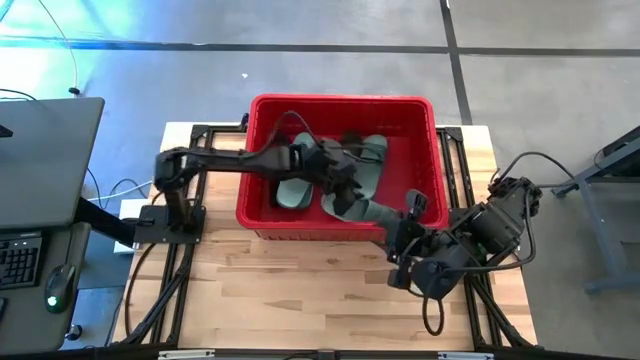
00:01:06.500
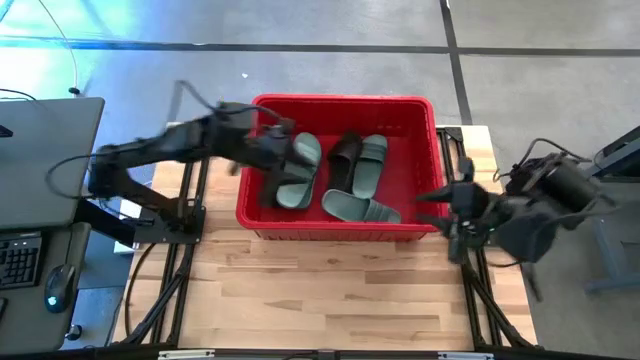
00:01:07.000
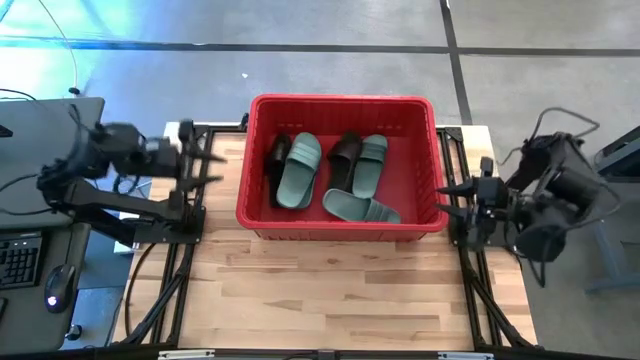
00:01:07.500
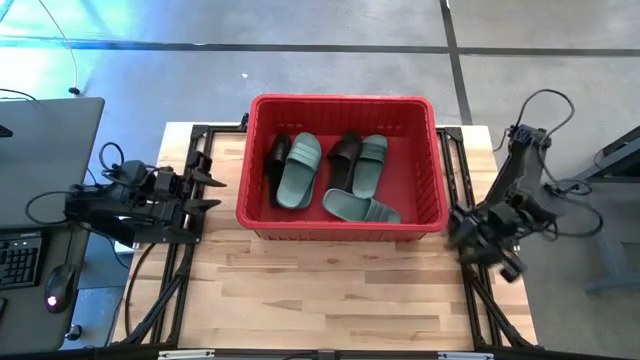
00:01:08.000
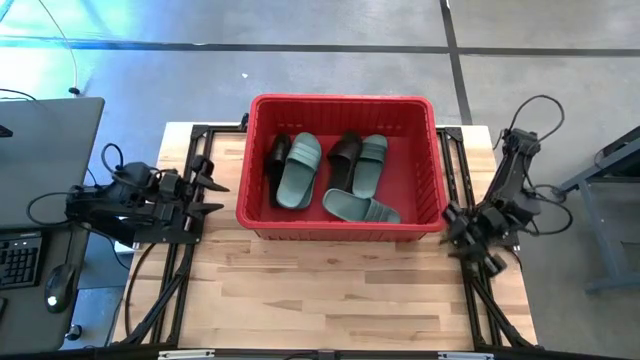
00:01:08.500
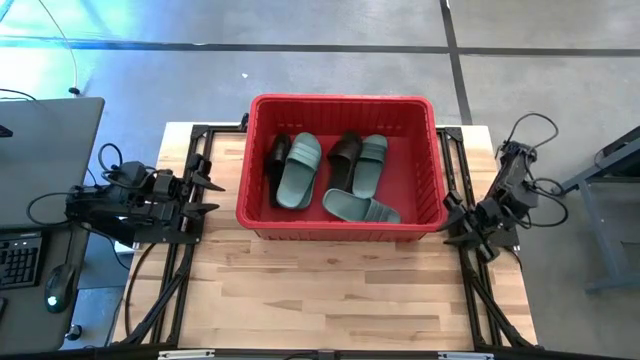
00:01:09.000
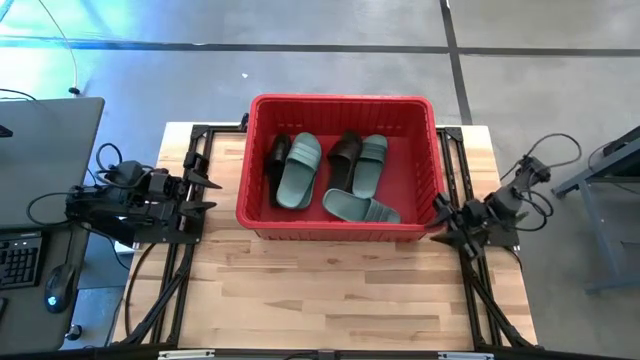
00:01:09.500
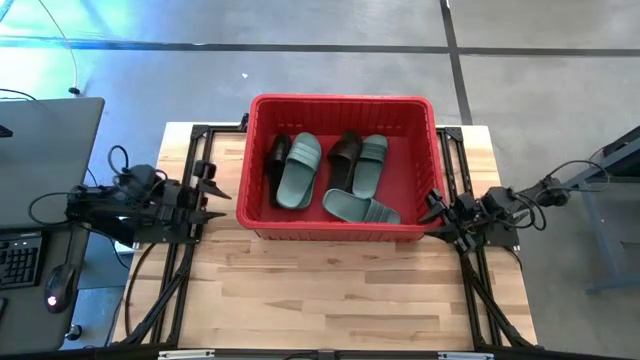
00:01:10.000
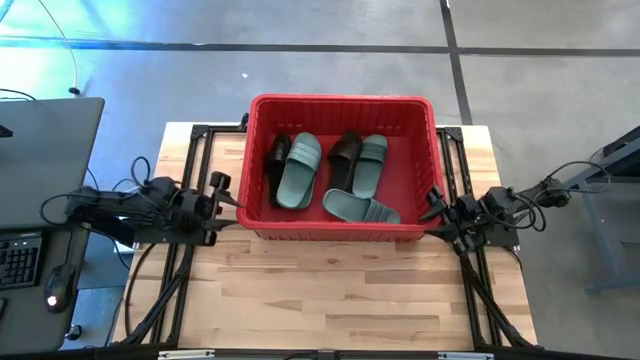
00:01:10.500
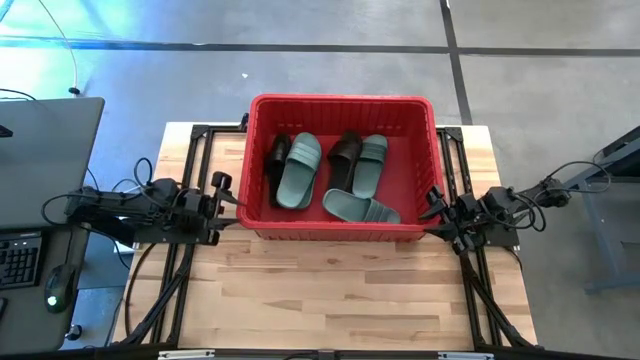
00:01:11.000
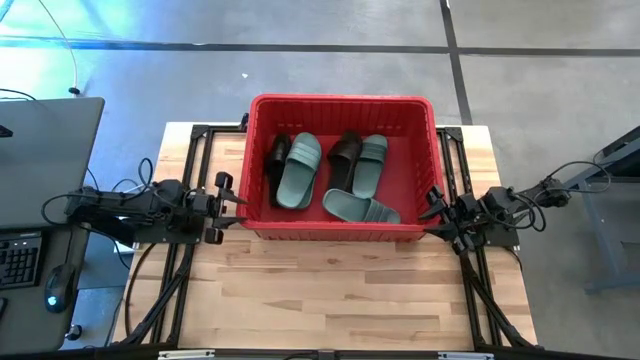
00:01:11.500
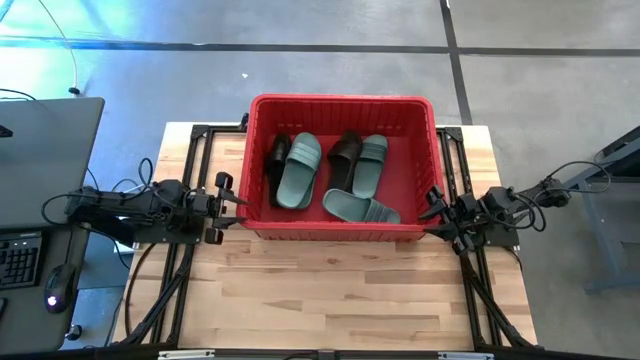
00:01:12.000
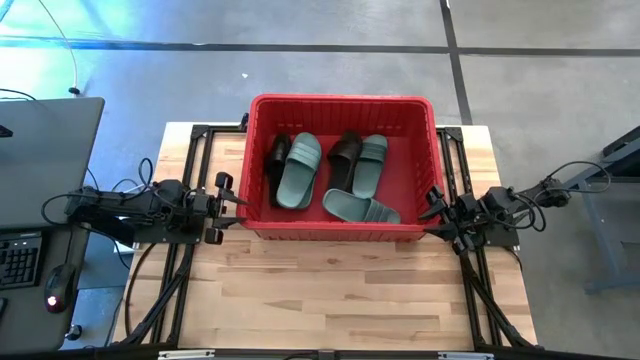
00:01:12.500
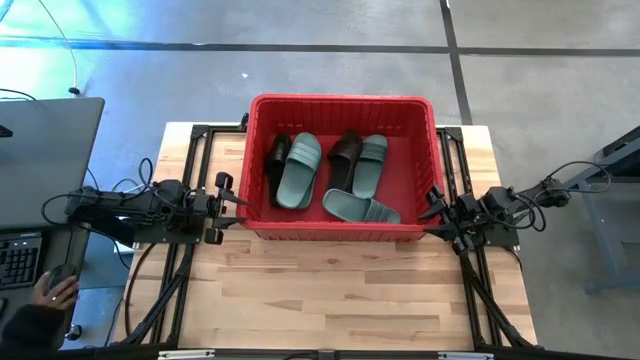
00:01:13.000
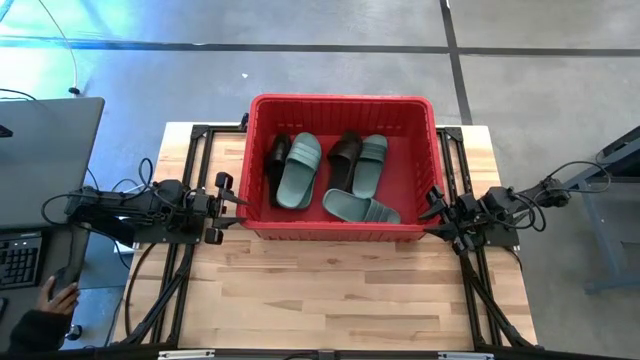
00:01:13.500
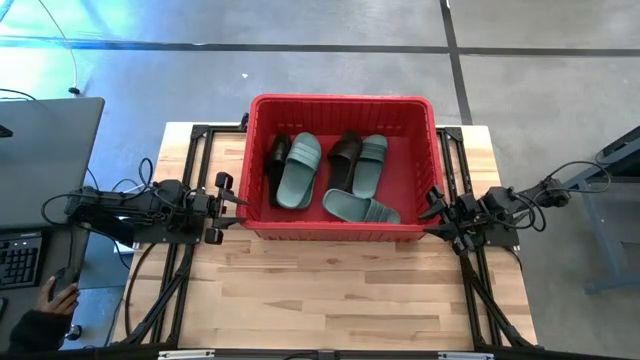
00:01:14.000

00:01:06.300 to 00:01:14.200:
Task: Pick and place slides into bin
Return to Home Position

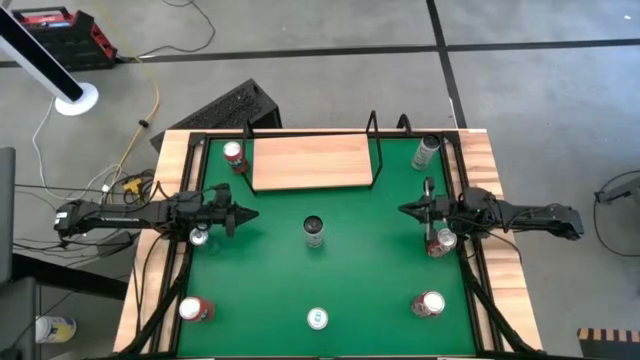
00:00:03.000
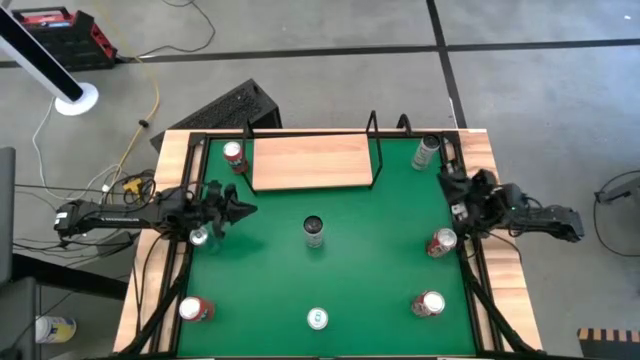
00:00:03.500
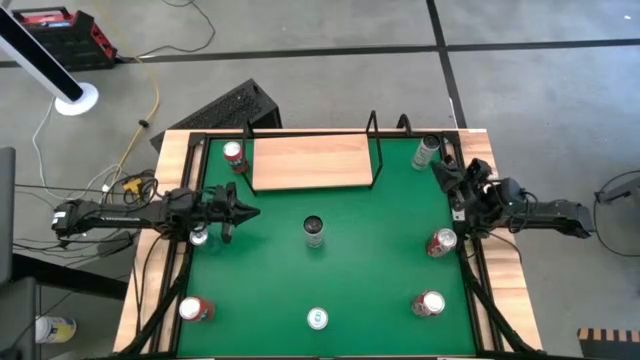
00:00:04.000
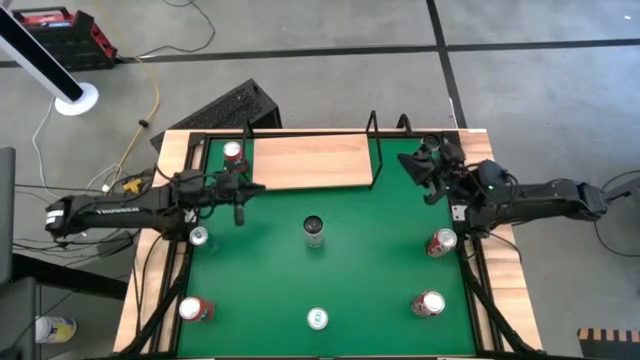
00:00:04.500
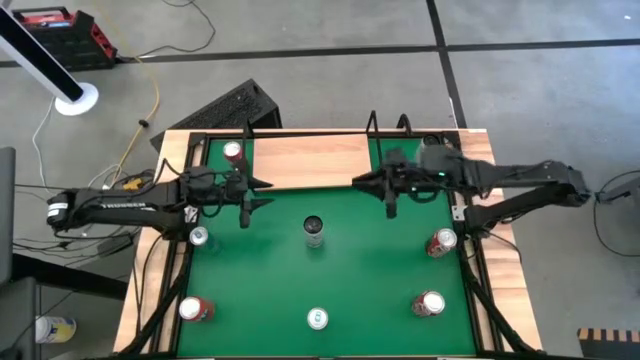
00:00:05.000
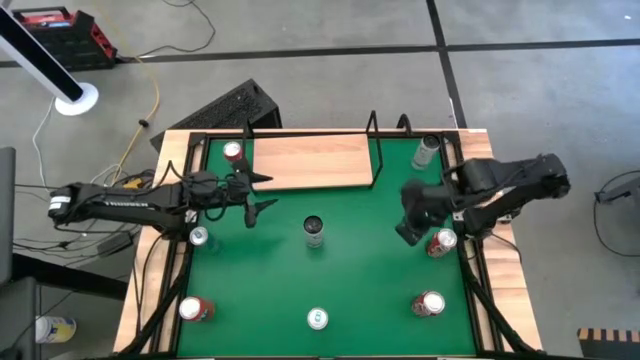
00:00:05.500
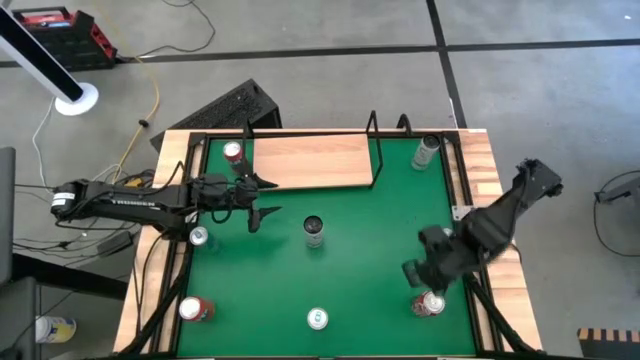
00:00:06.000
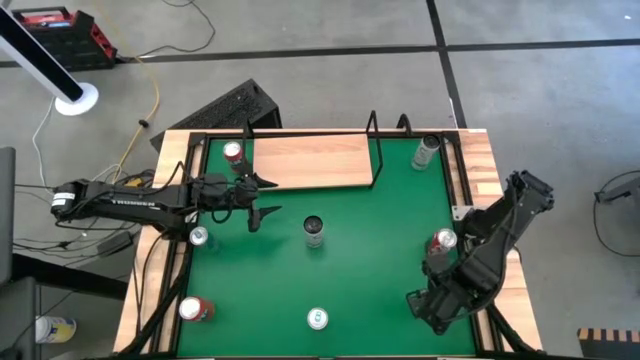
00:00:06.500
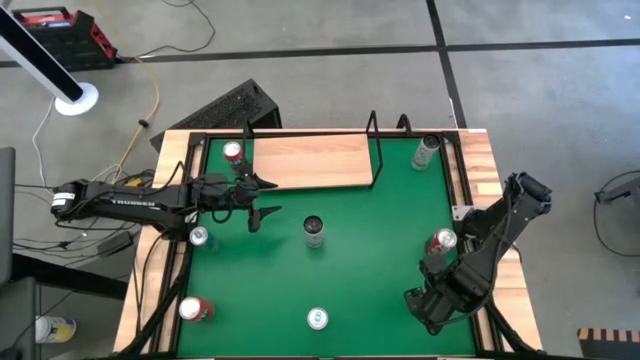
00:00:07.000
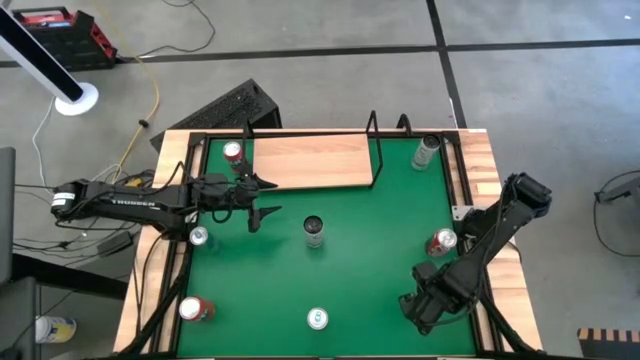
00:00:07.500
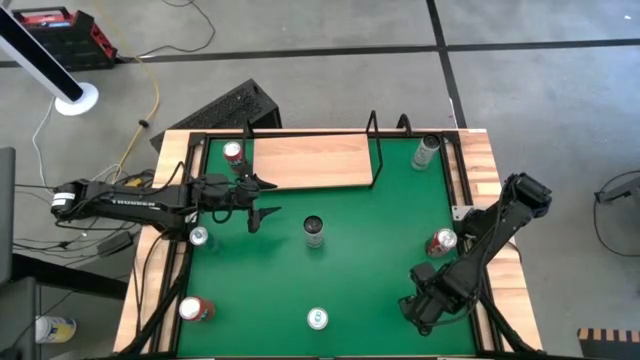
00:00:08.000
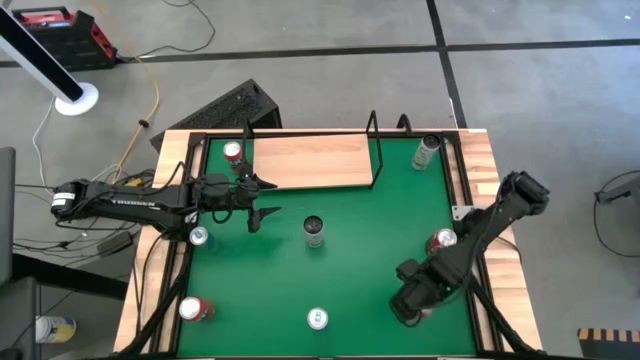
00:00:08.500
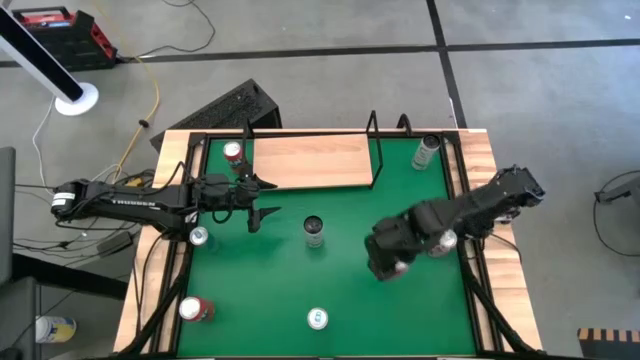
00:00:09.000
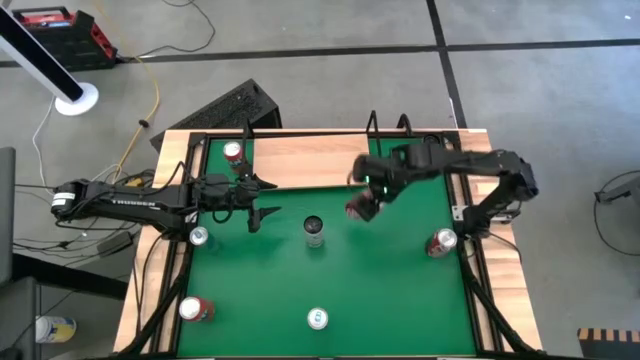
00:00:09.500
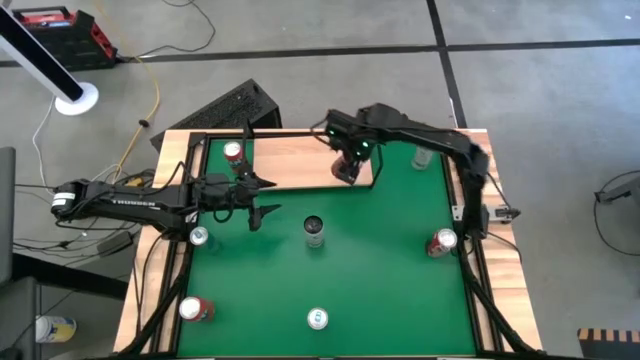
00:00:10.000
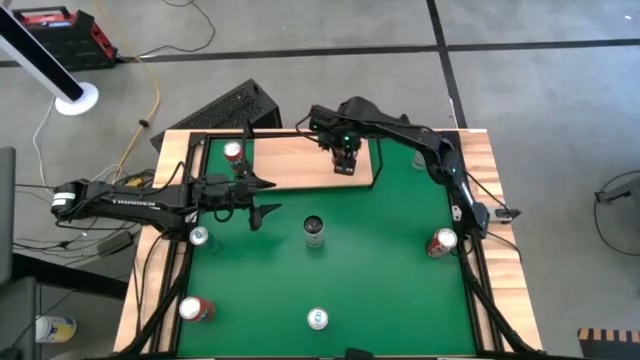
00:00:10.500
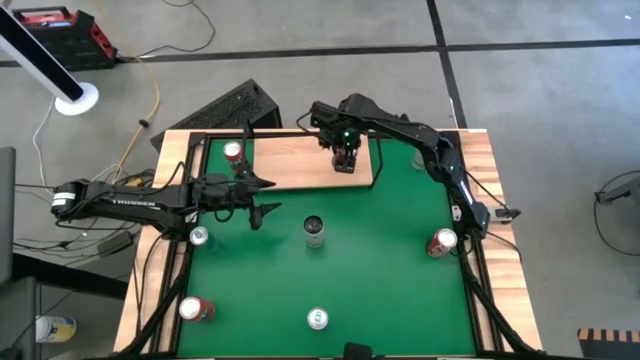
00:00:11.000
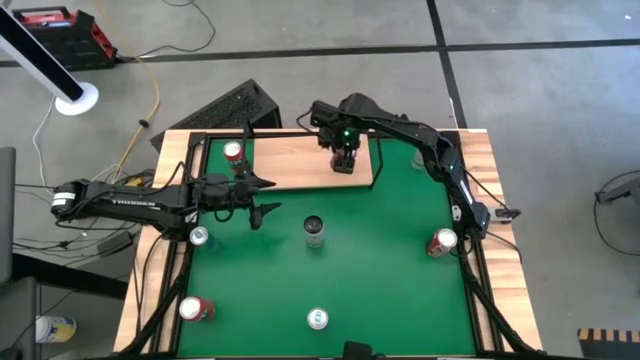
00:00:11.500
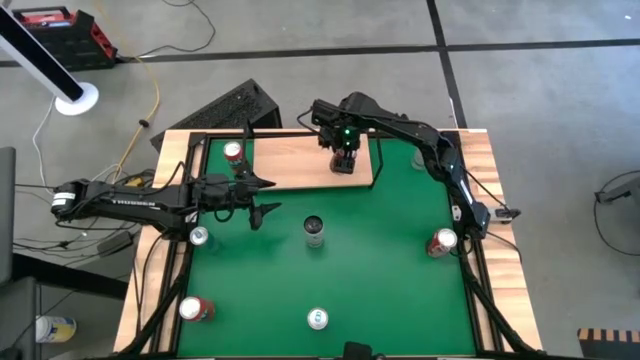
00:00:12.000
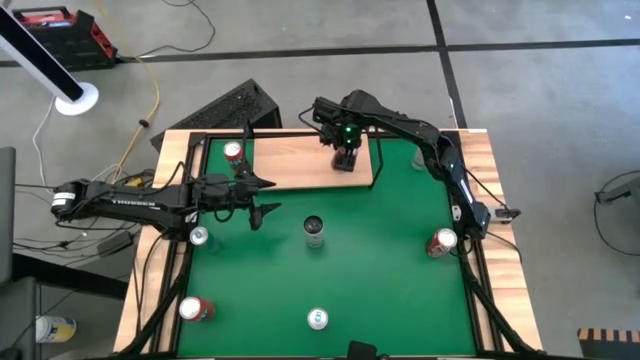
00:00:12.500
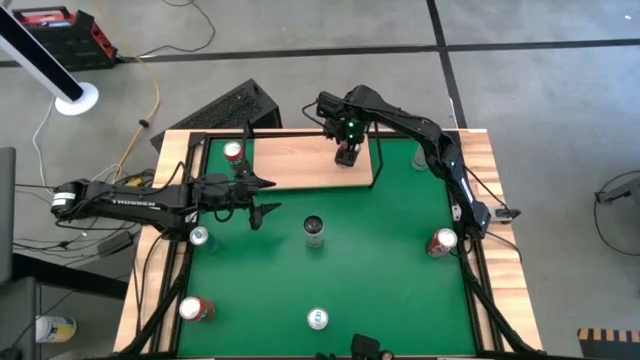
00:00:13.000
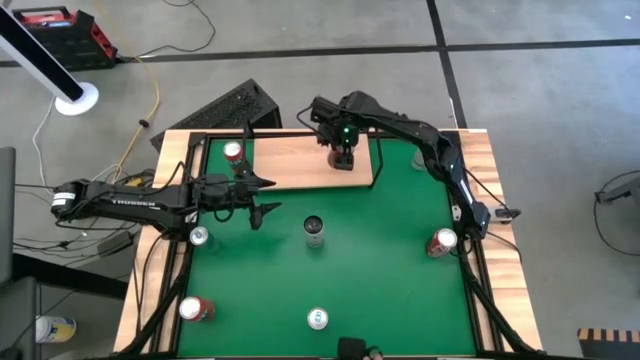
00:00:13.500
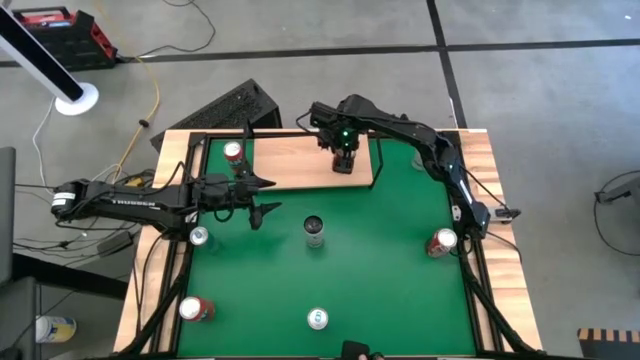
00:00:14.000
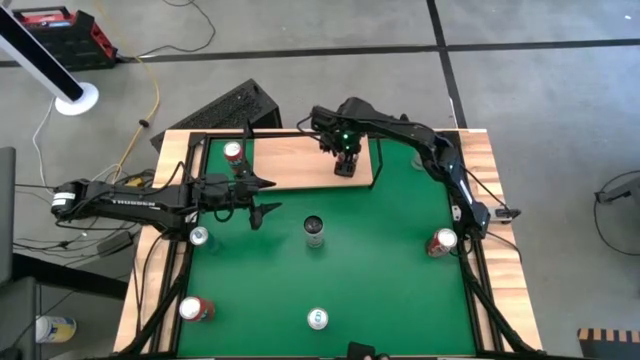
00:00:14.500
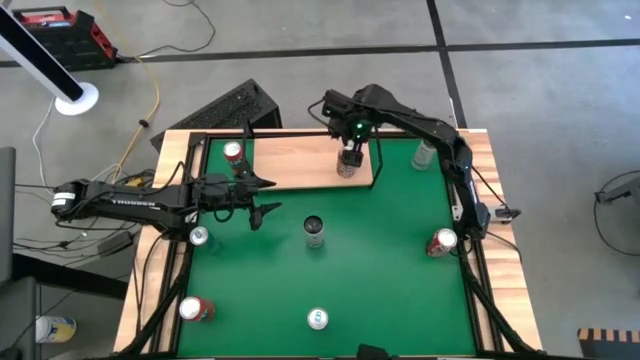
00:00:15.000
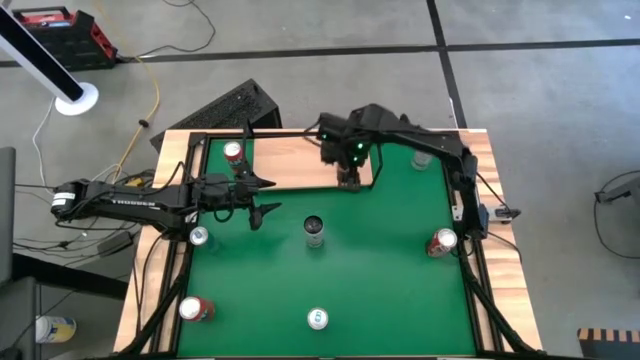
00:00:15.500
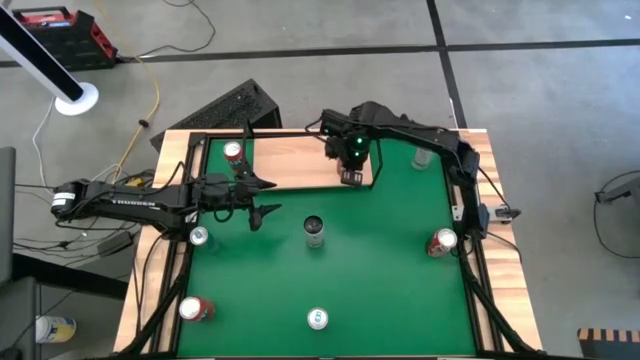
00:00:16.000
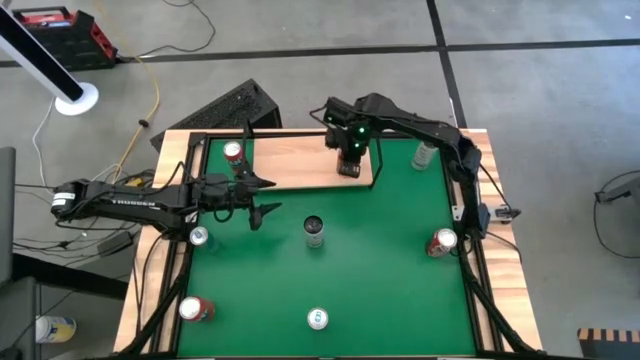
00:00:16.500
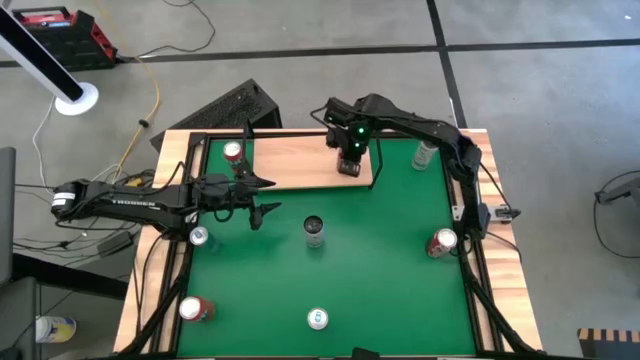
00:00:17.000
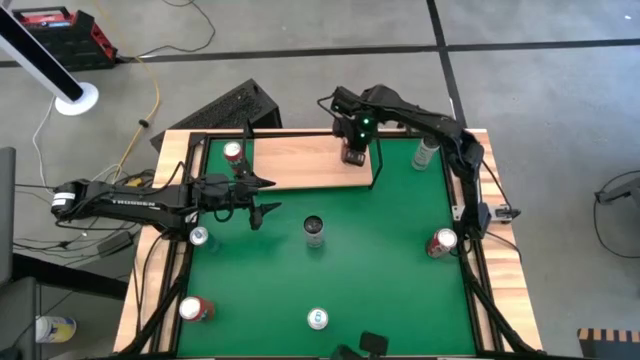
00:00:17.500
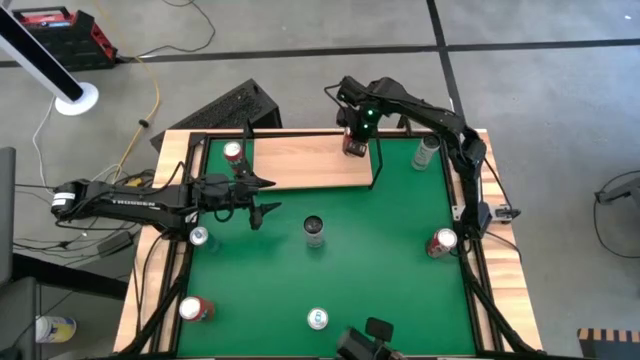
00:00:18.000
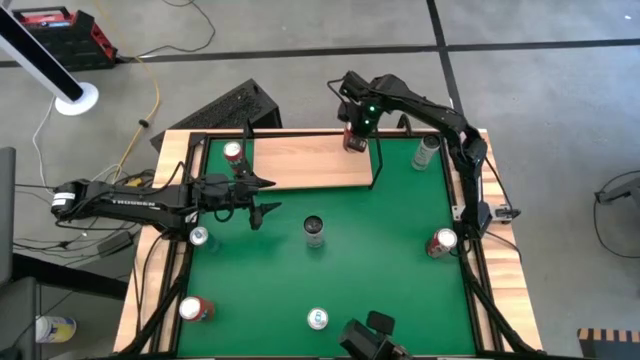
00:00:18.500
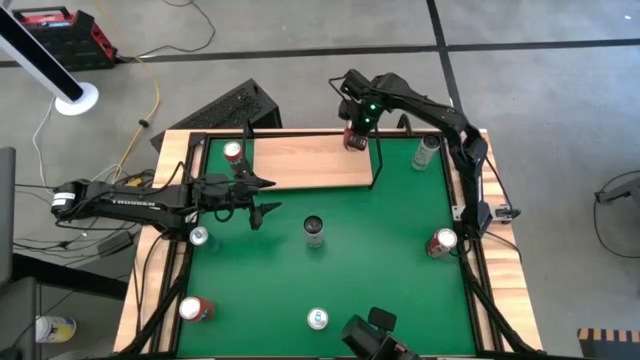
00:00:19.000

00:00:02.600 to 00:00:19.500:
Task: Place canned beverage on shelf
Put the bottom red soda can on the shelf
